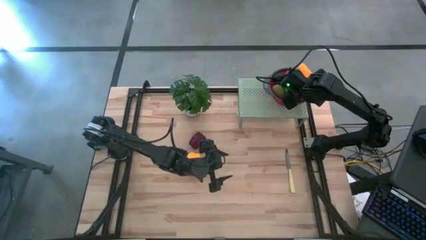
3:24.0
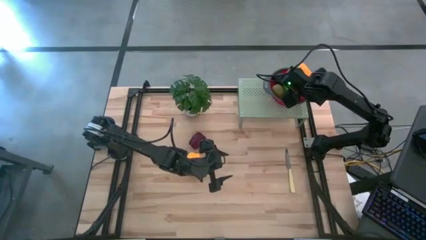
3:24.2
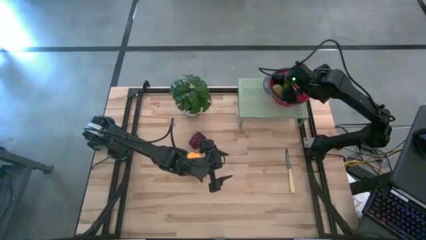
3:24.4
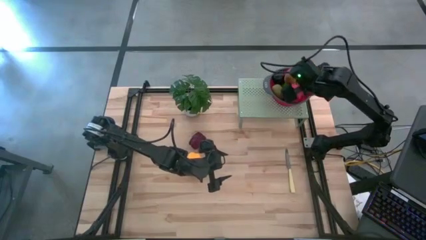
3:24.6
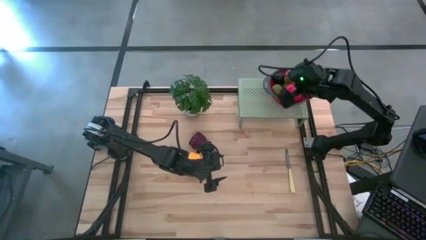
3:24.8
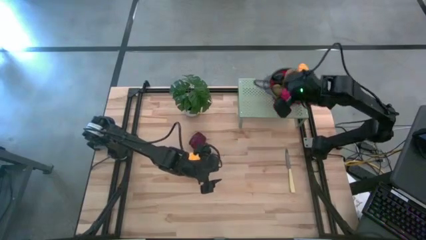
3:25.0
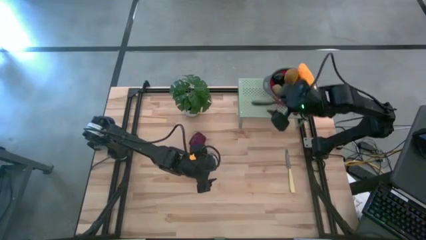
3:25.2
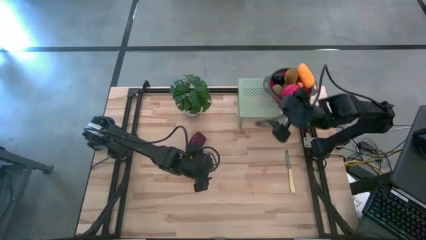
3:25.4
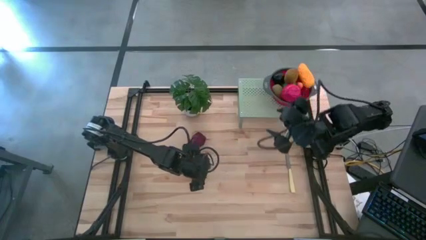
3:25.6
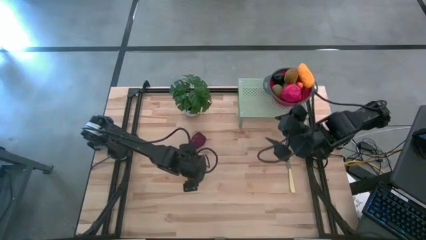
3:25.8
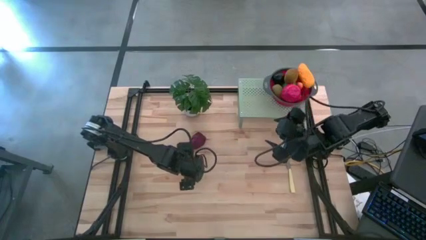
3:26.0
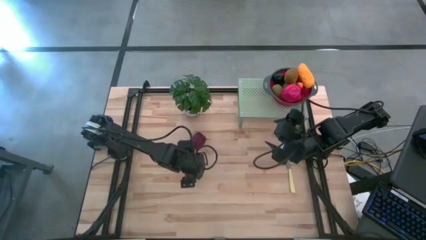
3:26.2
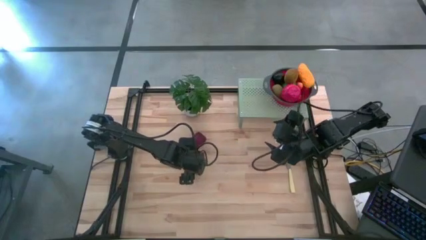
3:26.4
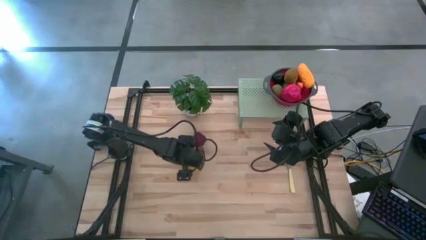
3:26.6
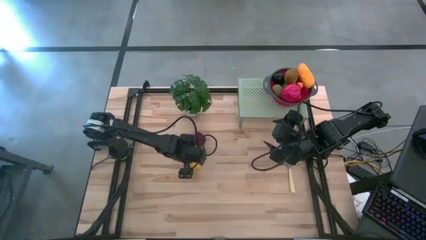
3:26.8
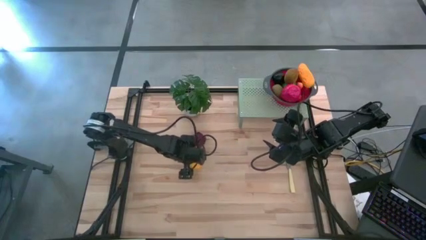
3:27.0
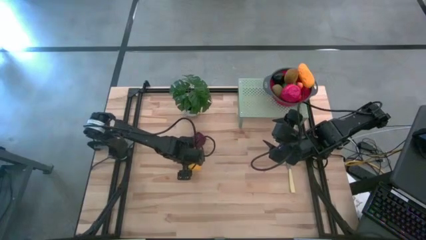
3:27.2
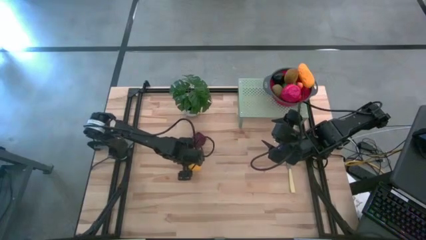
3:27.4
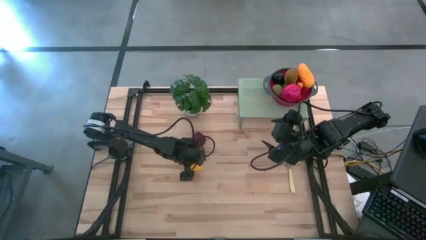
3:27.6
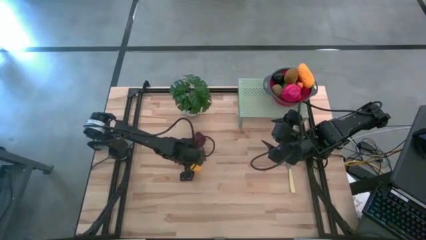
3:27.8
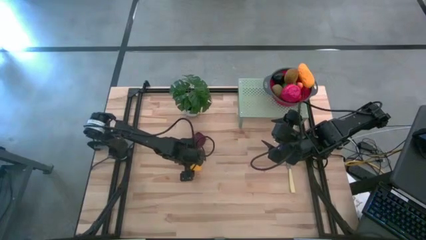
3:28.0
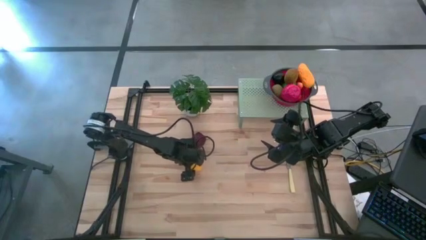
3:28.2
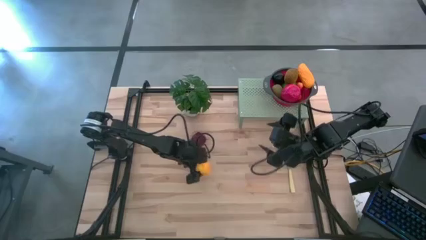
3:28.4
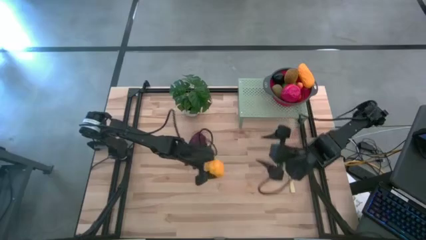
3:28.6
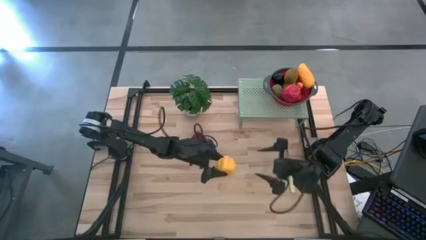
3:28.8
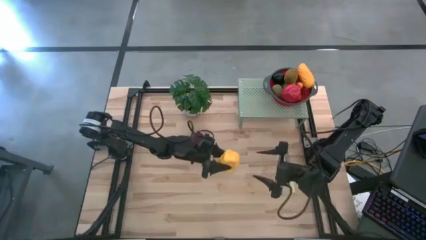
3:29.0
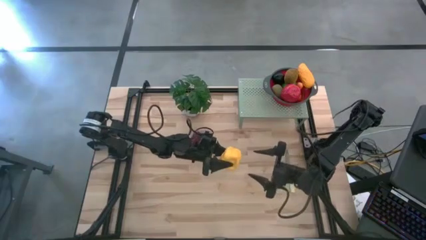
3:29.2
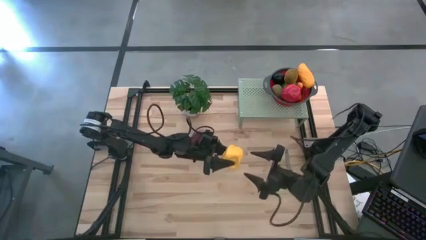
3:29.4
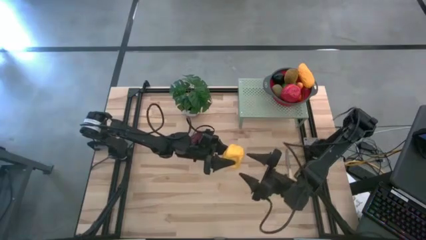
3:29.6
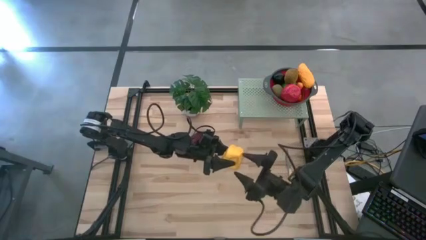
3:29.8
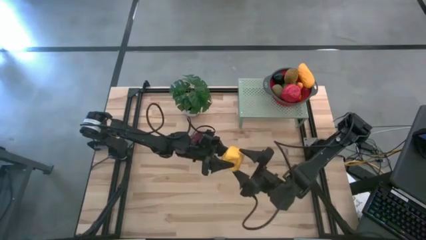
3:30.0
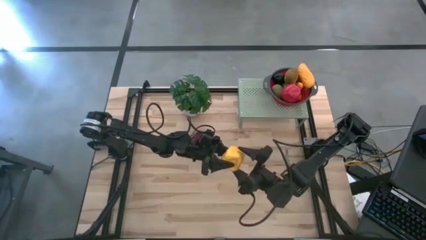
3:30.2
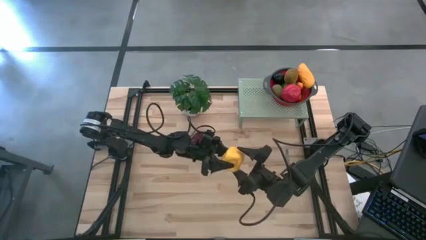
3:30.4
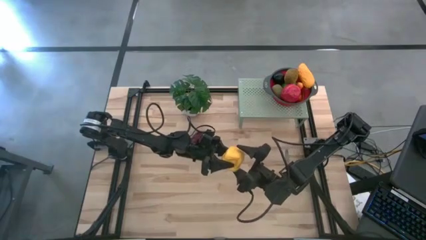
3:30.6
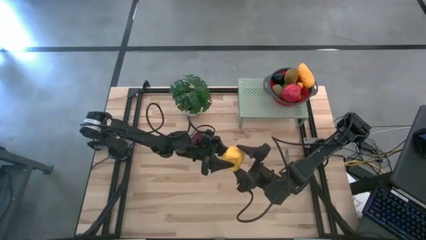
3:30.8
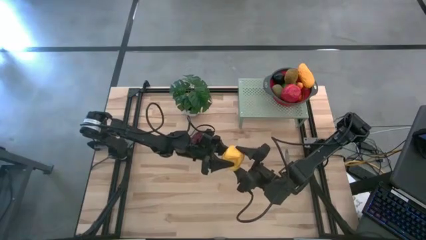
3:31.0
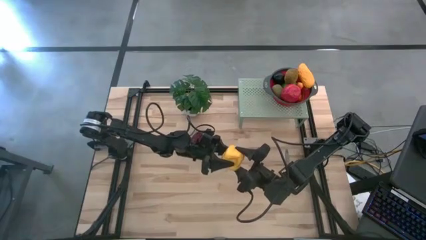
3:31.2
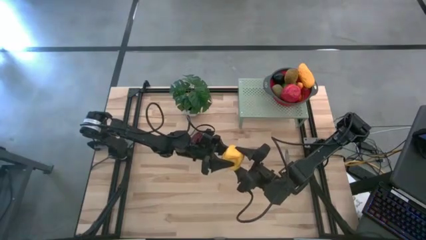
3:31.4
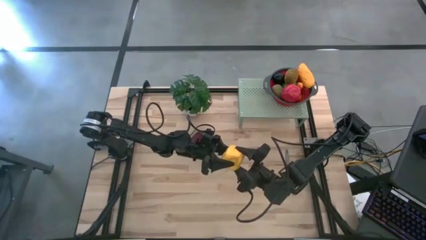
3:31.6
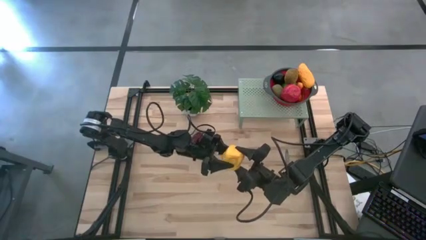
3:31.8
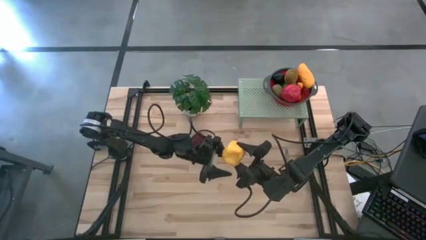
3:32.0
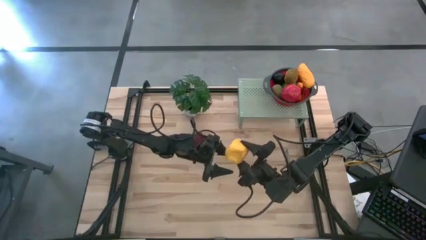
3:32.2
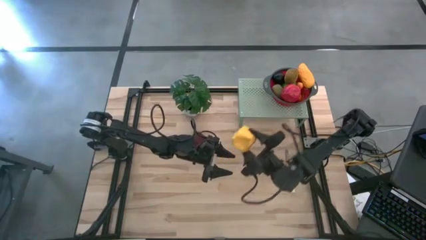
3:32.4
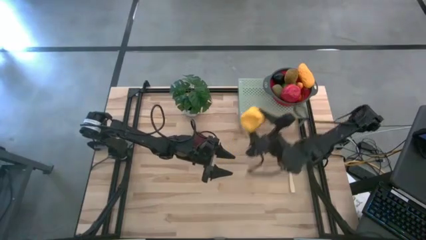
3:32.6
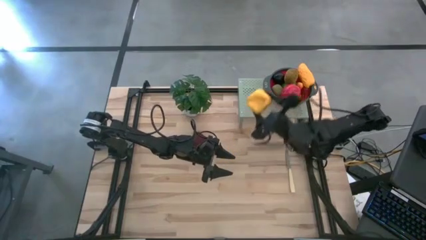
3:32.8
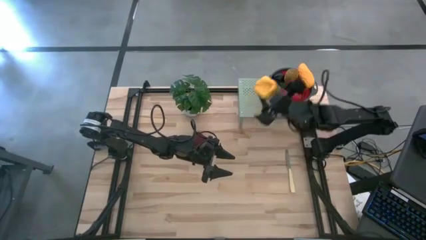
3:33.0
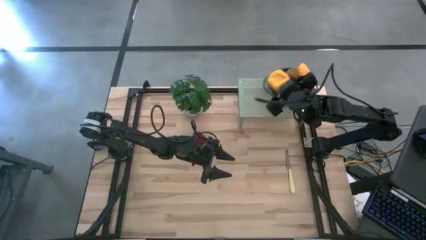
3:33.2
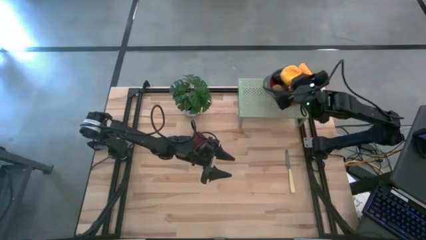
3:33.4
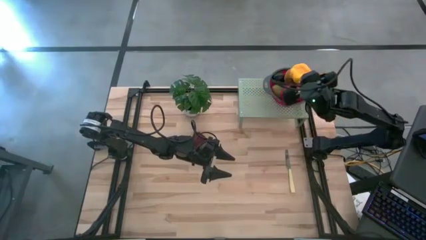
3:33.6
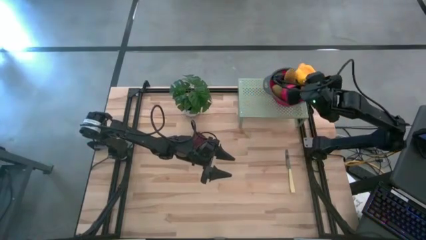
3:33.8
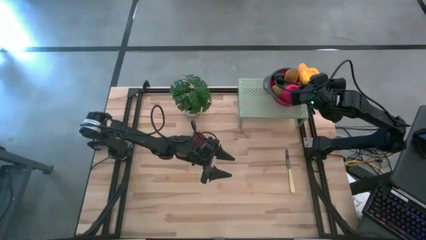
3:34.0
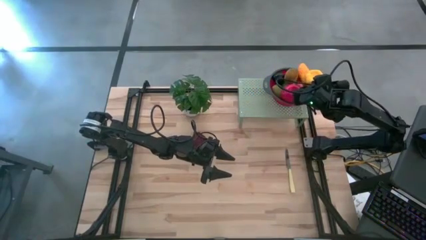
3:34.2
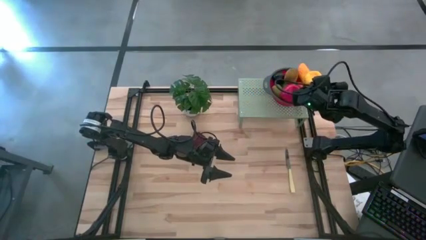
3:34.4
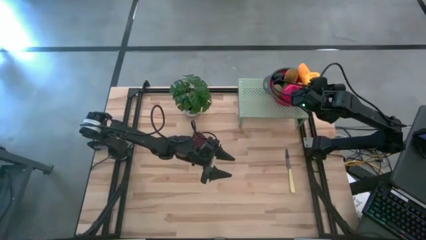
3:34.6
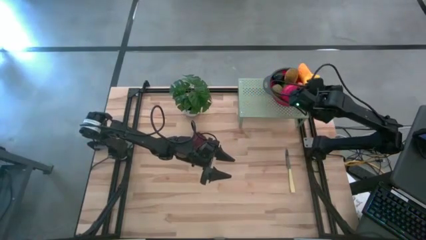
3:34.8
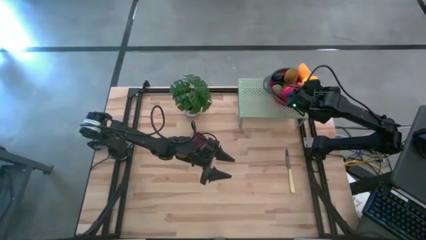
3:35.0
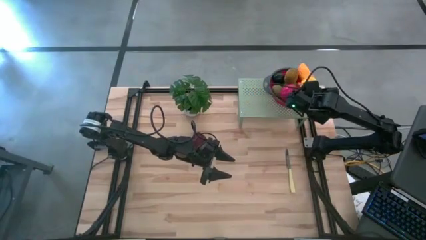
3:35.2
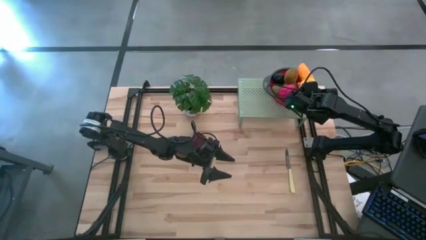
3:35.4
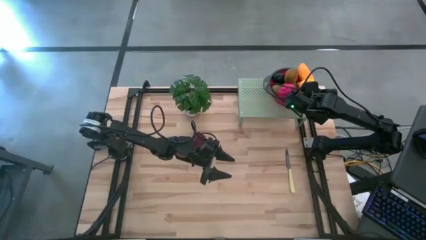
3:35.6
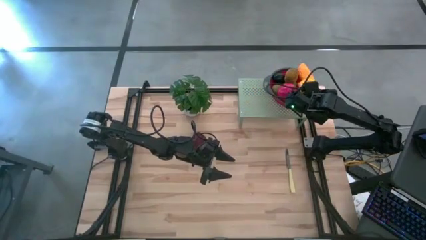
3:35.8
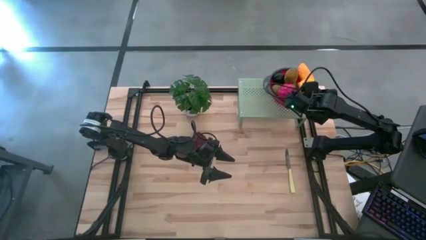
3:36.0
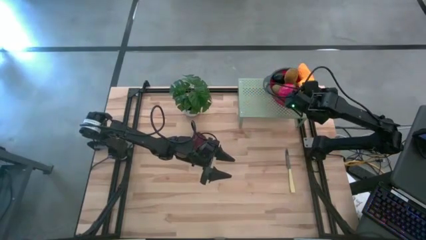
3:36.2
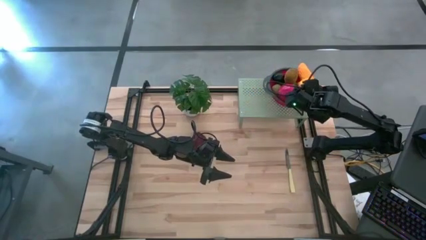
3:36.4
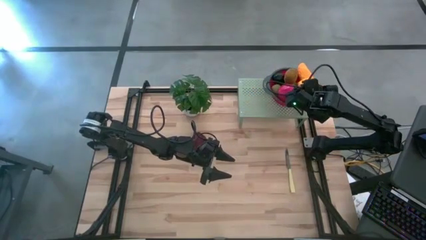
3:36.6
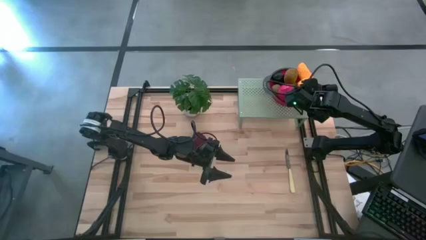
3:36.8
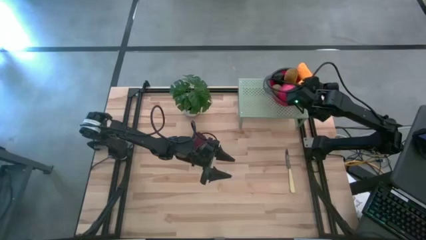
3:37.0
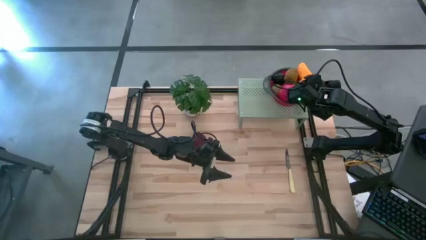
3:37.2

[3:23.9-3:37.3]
Task: Pick & Place Fruit
Put the yellow bell pepper into the red strainer bowl on the shelf

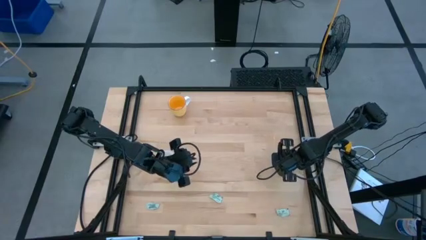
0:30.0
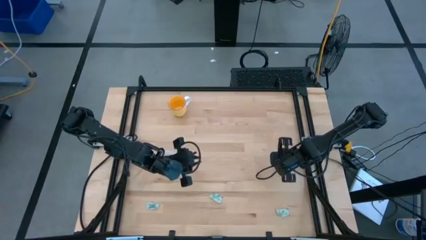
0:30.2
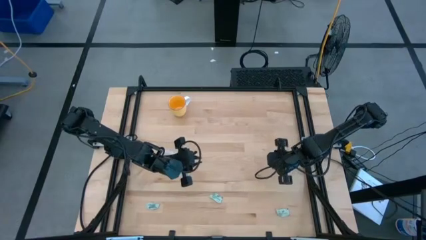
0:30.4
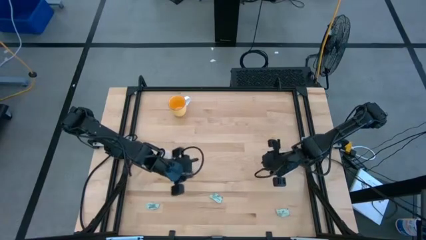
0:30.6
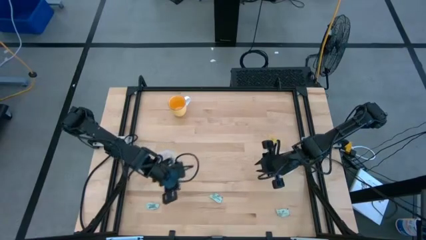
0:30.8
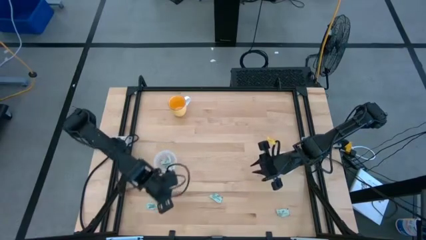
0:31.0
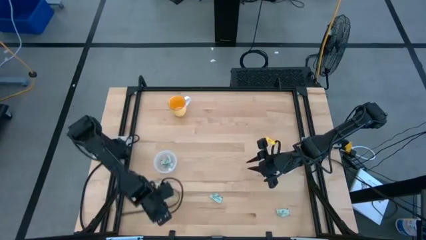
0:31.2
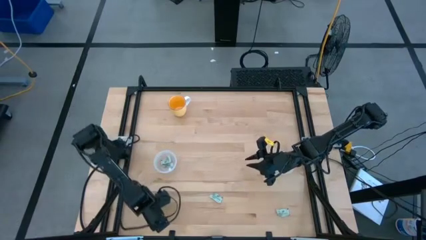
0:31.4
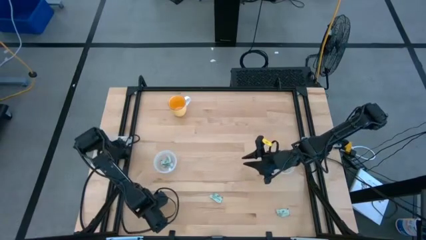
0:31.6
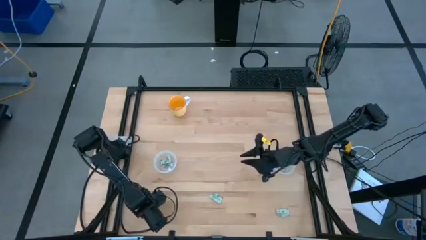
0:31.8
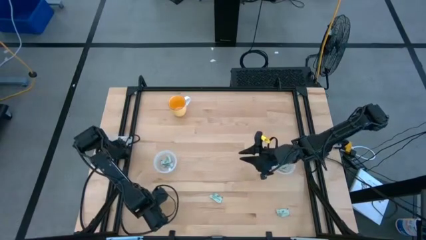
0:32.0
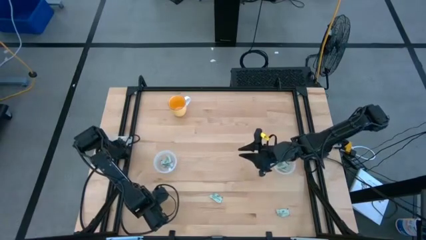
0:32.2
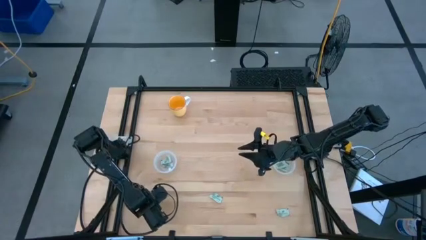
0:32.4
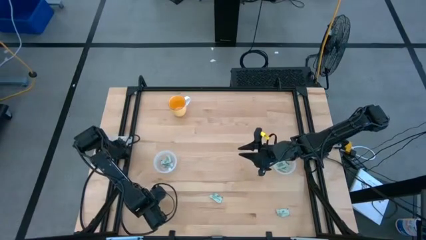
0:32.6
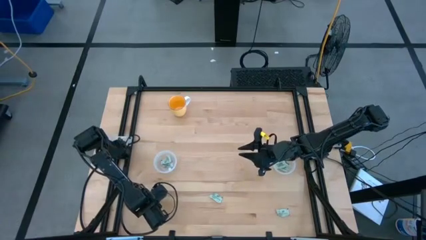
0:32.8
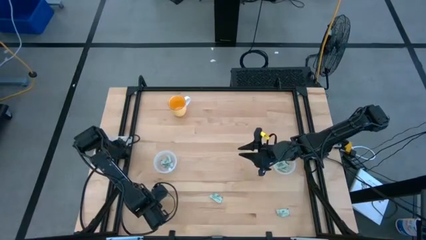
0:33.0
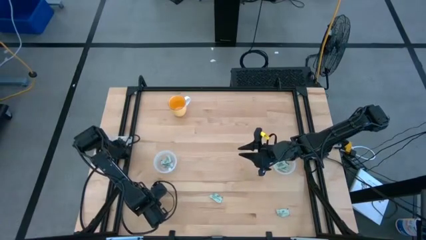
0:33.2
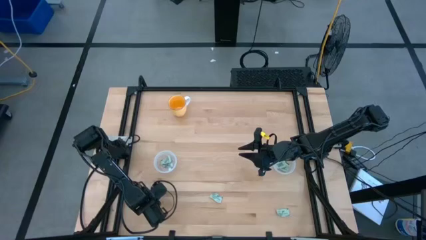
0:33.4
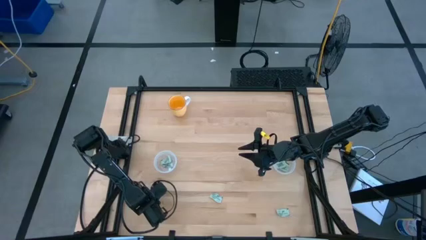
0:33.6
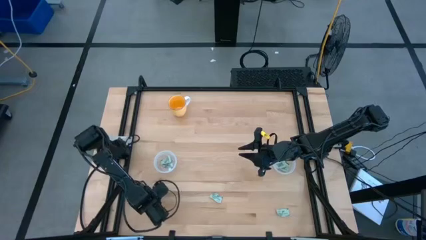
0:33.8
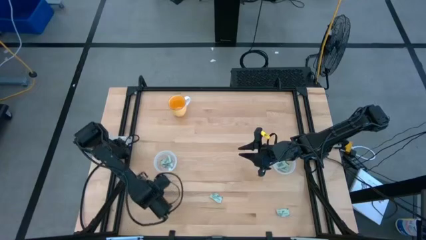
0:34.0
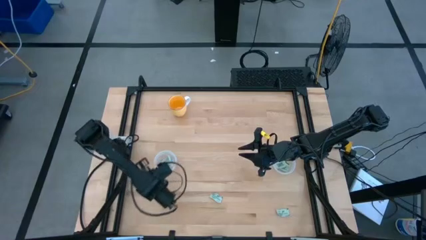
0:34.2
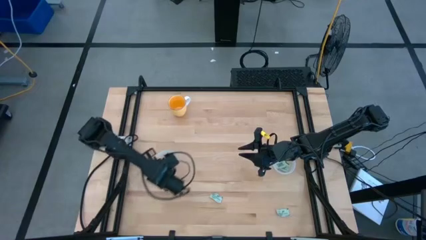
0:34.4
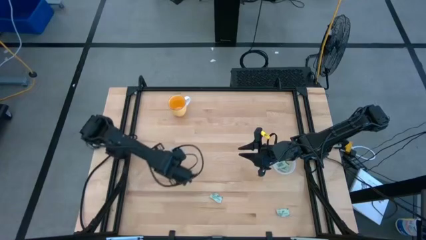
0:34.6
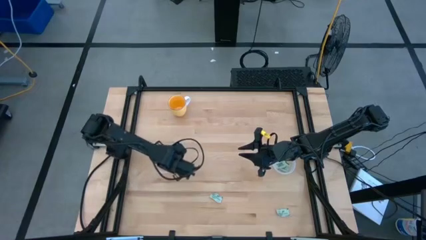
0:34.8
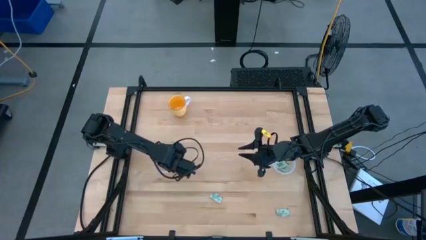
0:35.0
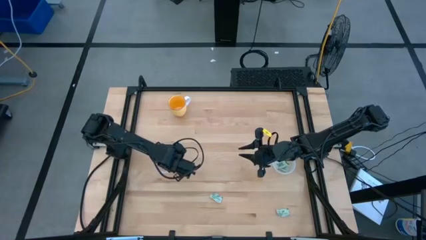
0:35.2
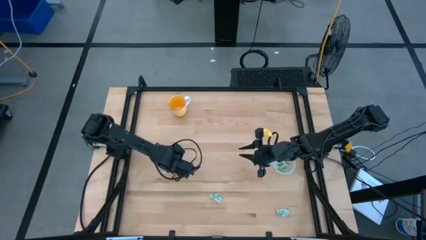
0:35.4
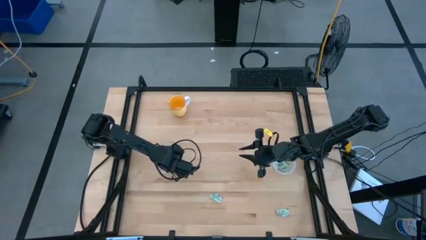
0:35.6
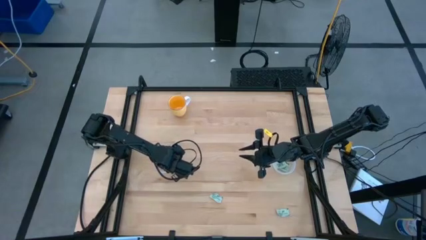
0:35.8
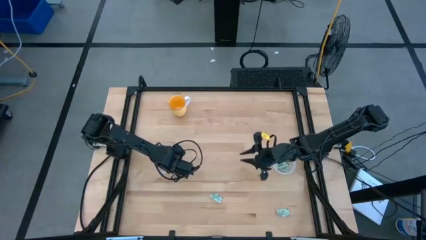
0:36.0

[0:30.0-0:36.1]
Task: Pick and place items into bin
Put the stevia packet into the left transparent bin
